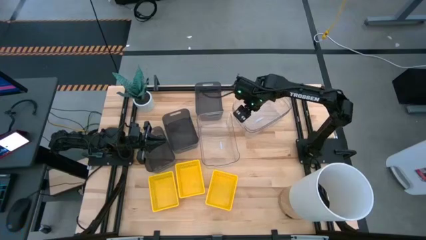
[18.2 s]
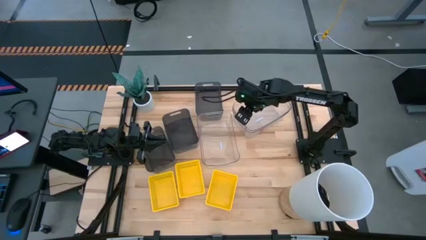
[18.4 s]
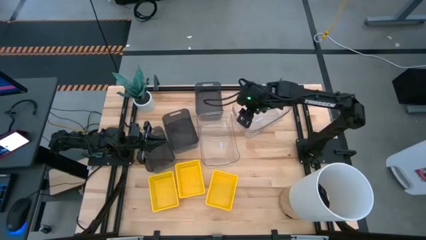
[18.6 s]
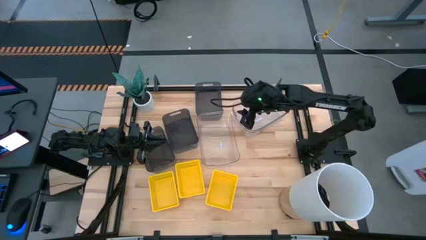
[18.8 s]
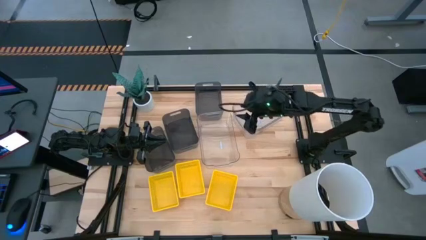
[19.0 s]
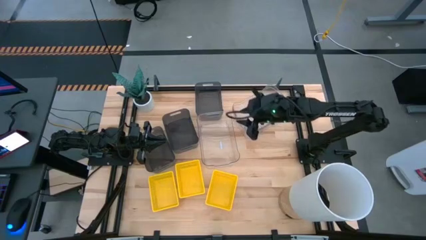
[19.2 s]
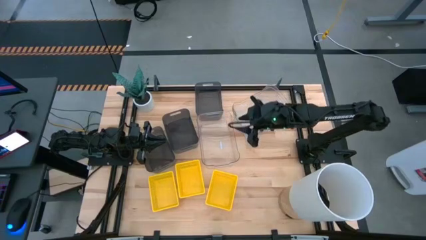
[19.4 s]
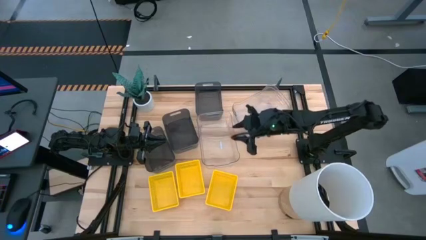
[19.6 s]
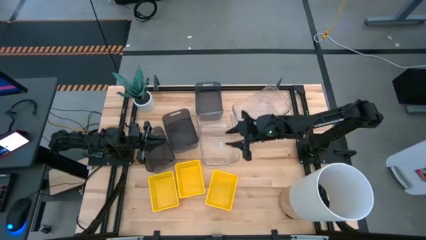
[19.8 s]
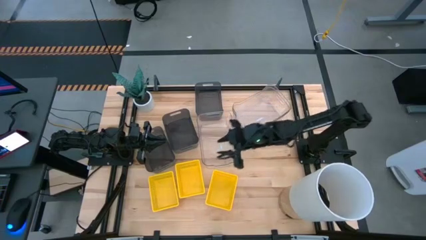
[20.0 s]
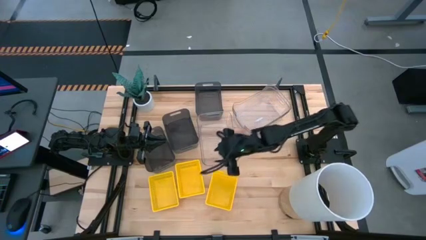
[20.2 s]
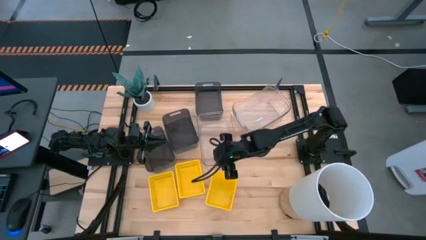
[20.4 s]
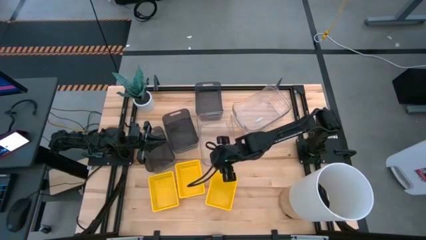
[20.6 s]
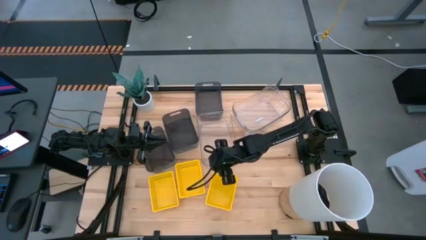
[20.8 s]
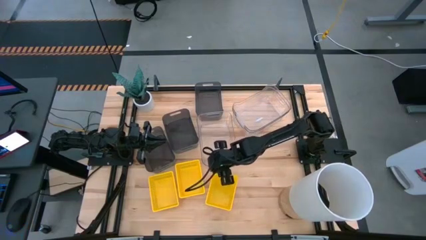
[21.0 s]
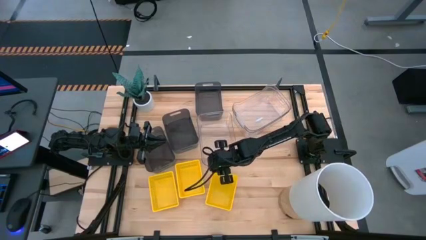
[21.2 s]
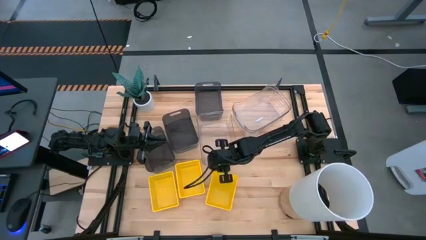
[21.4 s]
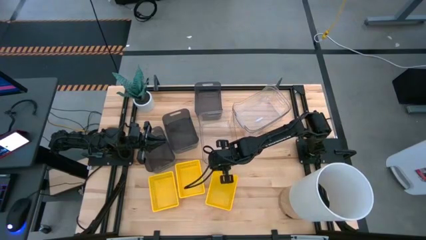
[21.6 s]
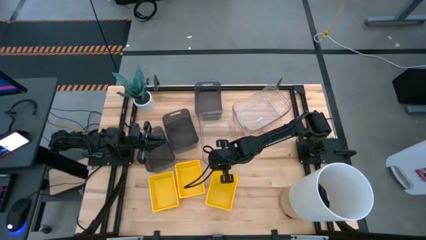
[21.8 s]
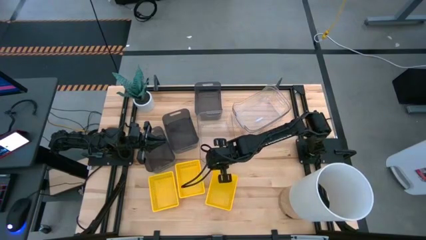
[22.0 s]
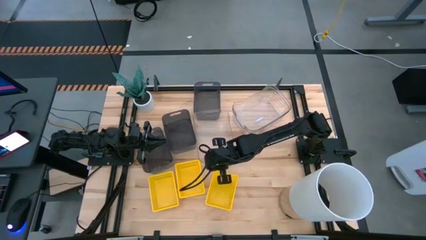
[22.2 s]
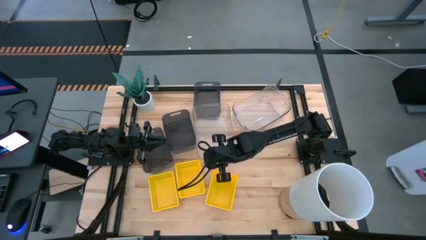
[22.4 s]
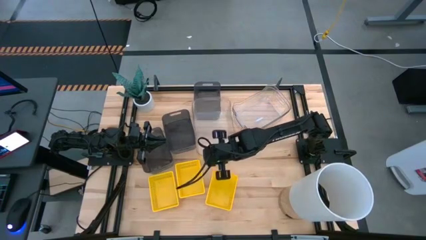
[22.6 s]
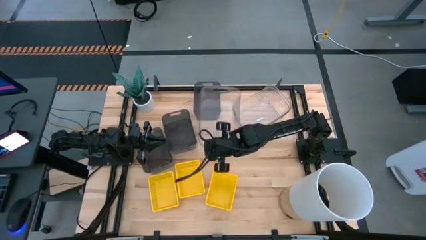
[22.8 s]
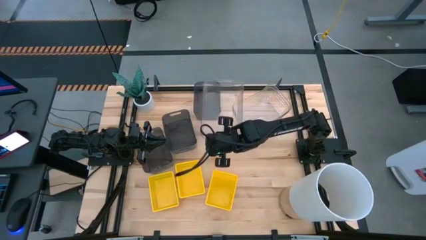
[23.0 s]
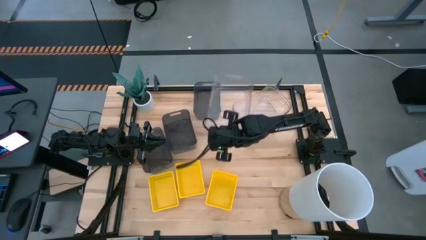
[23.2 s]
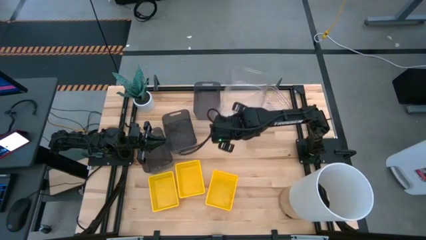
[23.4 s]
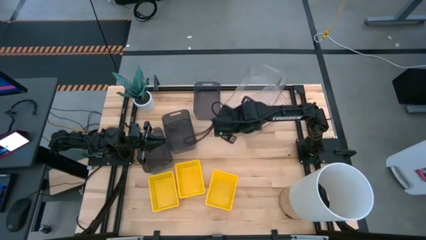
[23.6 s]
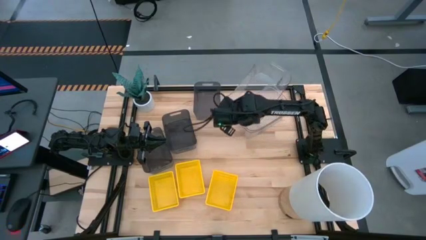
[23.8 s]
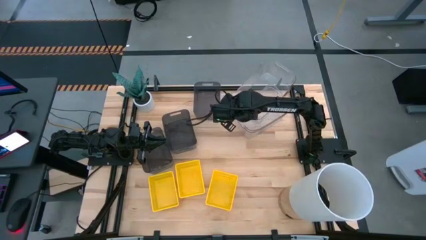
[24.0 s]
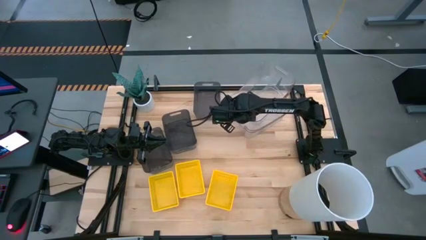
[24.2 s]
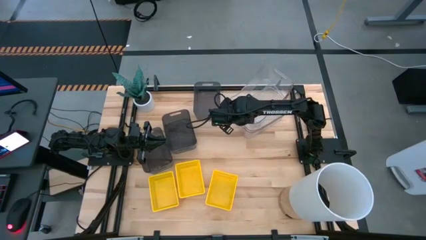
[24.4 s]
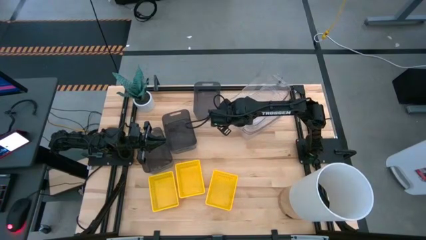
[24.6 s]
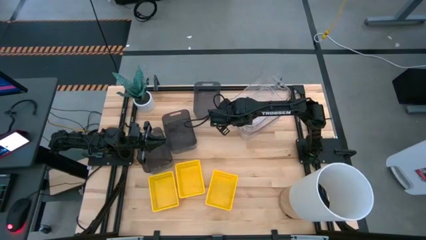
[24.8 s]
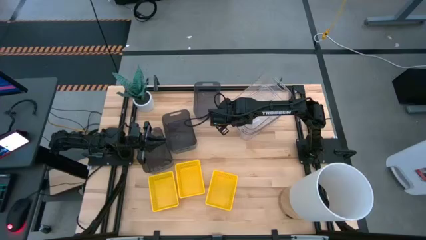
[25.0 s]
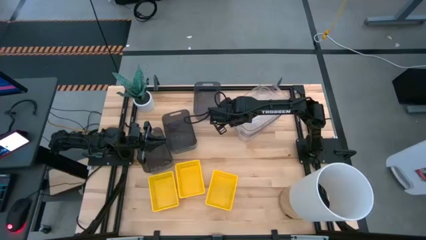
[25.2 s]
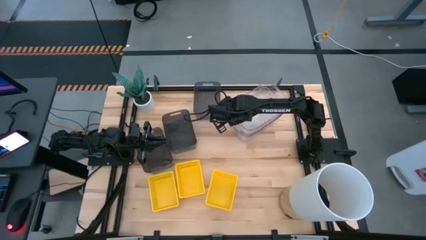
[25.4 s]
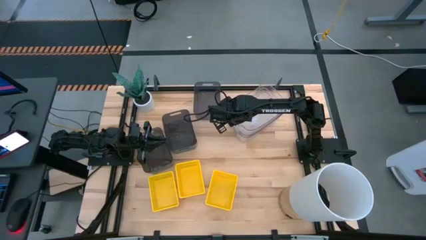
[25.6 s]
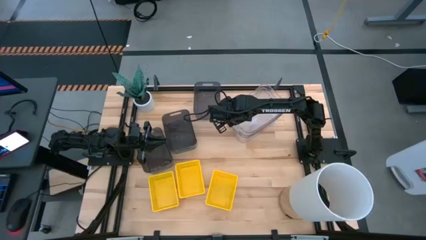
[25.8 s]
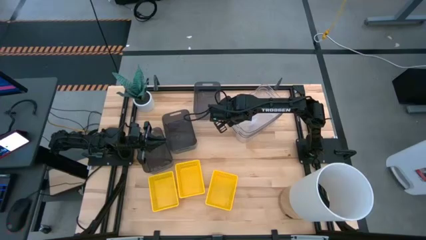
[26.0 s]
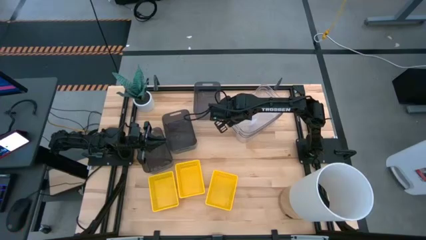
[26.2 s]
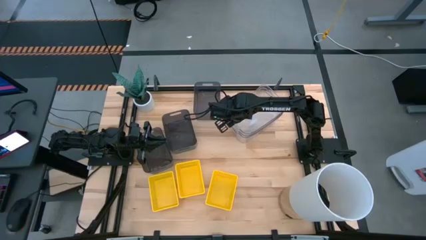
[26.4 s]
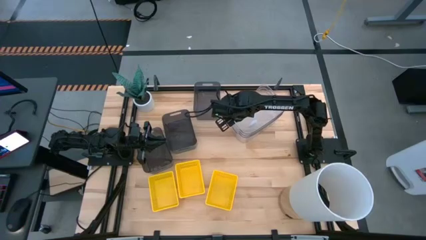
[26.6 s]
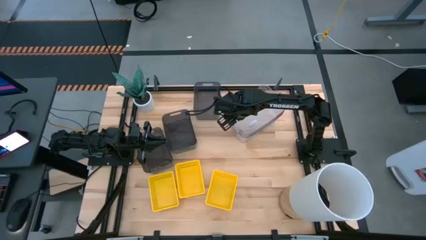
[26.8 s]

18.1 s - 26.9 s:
Stack the left transparent bin on top of the right transparent bins

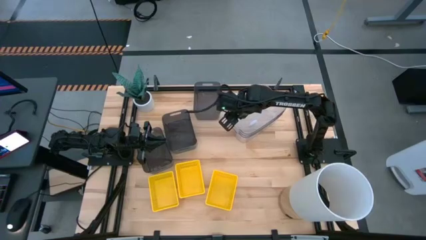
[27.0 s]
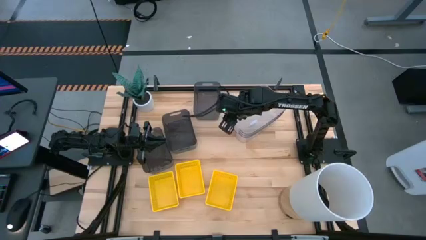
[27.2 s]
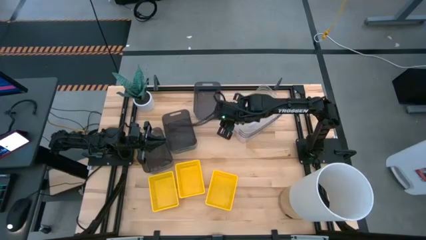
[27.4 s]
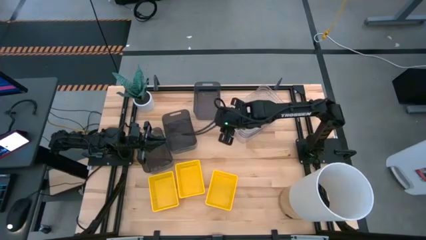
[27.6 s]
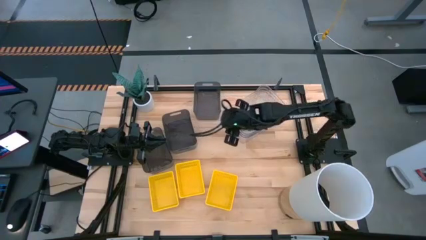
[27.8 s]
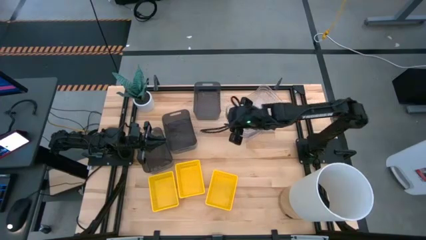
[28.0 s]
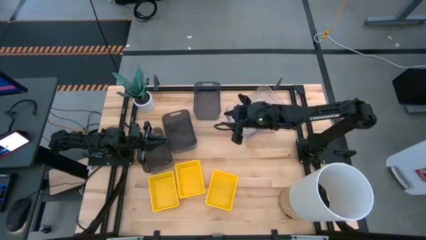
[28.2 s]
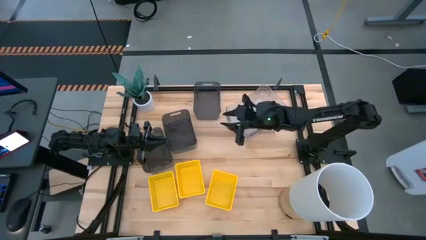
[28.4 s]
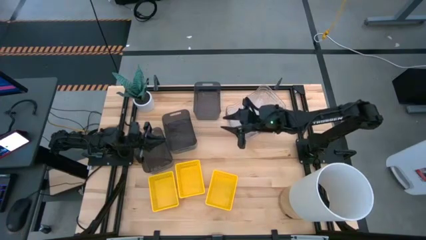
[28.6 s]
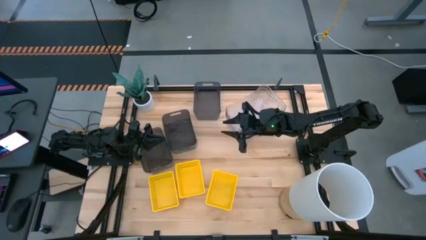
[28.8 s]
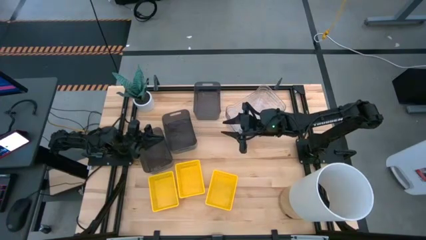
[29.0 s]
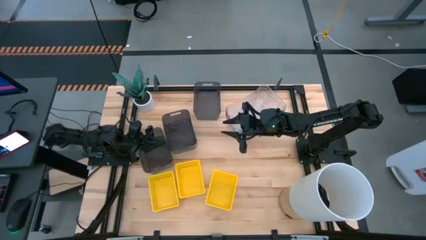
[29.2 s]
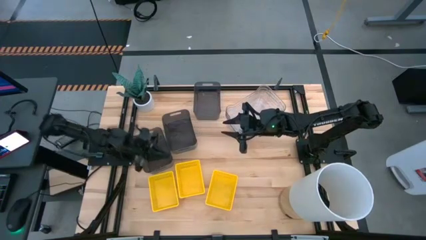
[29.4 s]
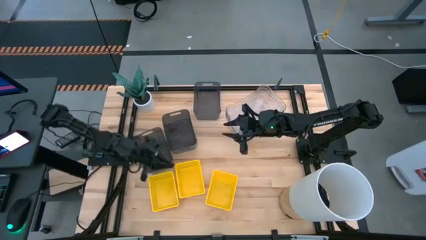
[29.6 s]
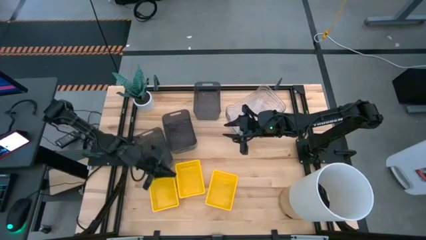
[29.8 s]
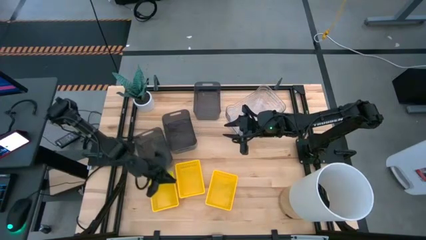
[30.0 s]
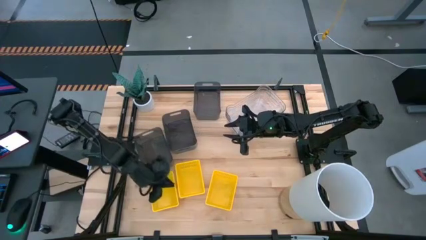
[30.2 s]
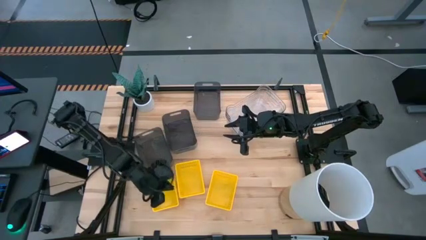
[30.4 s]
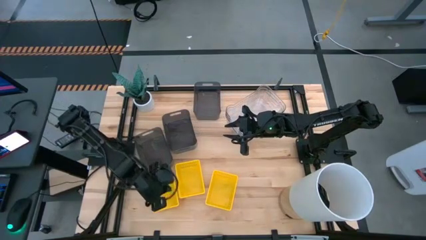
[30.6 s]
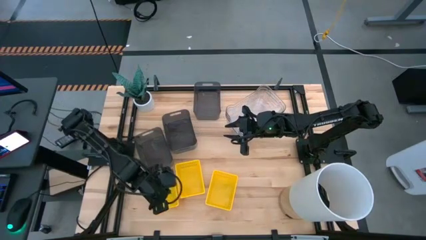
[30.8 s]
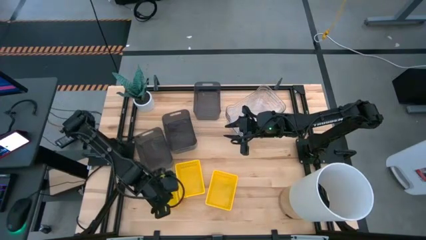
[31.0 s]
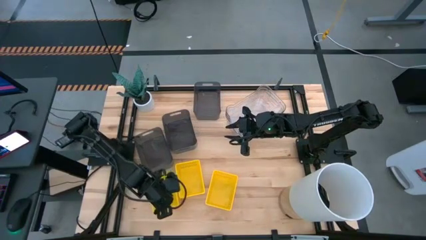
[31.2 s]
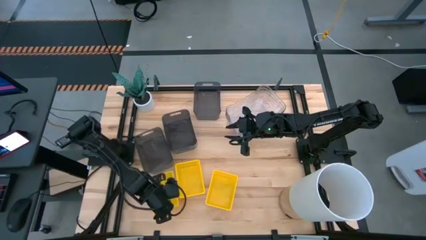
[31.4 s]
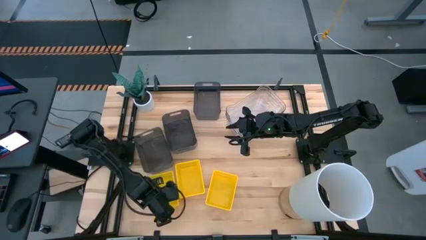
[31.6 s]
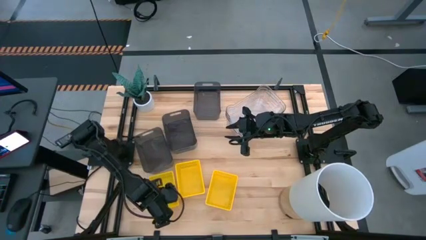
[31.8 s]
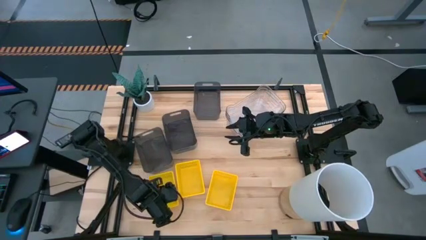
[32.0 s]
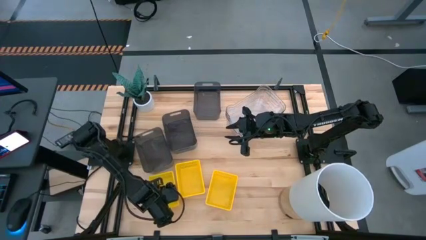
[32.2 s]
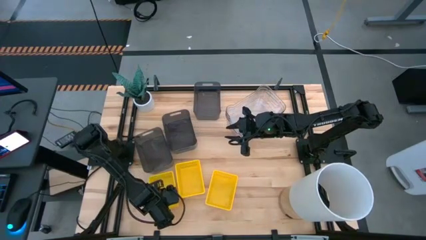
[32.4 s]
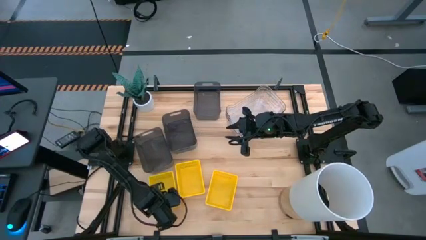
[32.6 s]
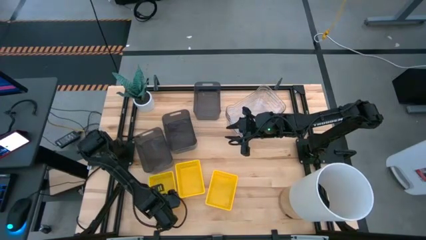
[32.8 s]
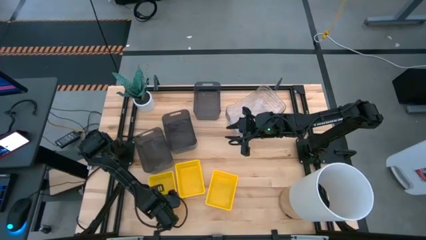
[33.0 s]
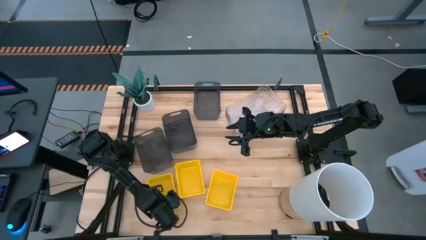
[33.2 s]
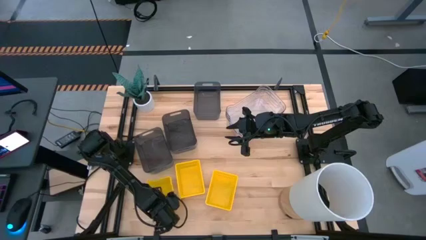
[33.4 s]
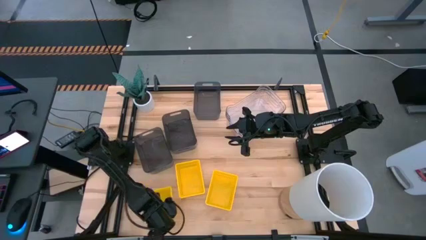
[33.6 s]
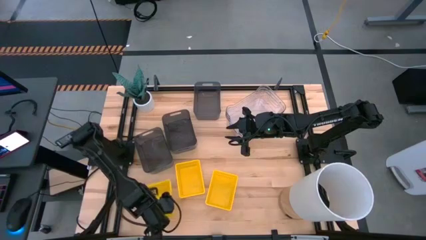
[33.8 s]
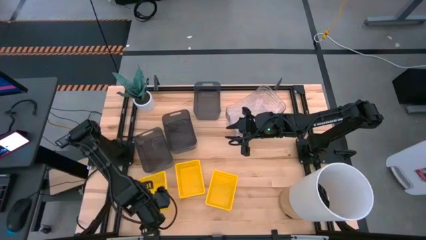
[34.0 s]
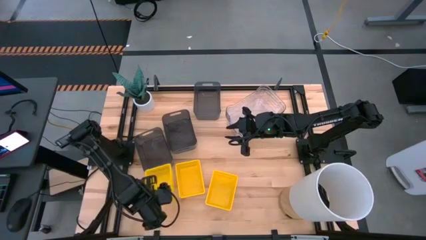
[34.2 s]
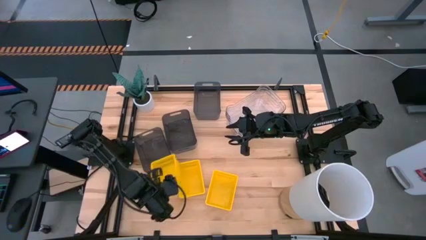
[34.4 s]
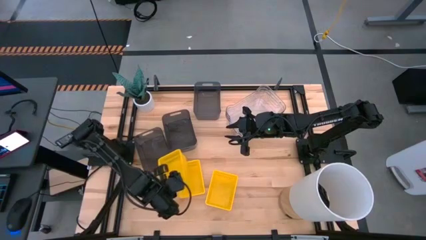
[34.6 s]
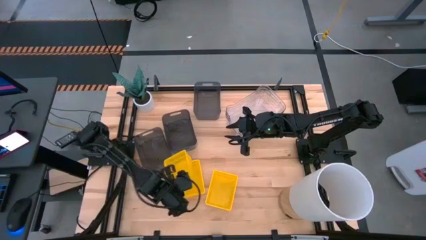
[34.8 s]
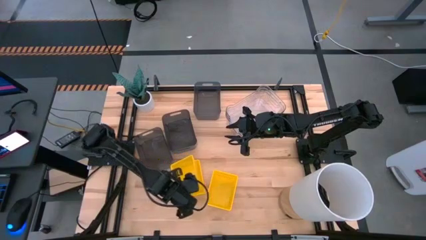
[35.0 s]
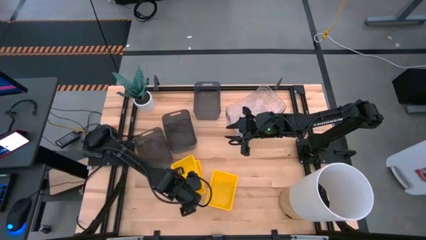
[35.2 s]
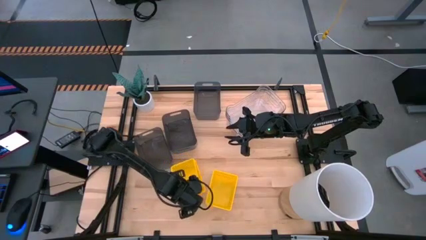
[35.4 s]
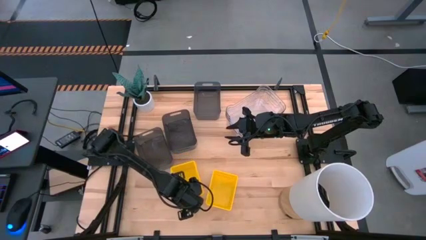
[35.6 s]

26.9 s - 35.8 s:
Stack the left yellow bin on top of the middle yellow bin
